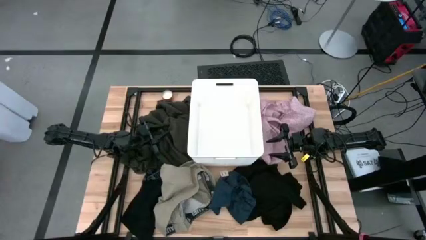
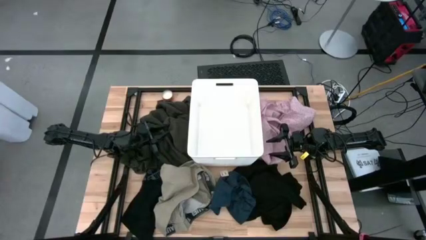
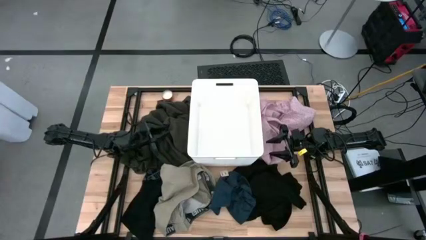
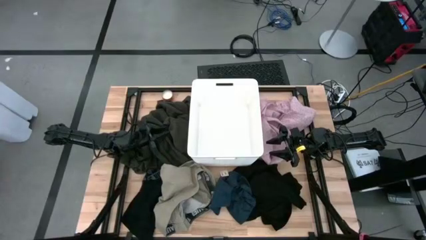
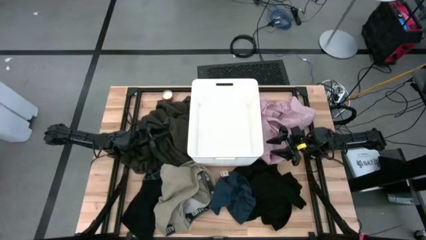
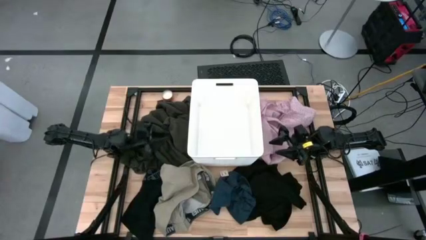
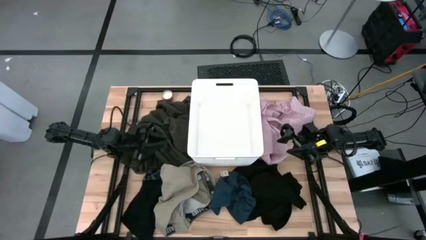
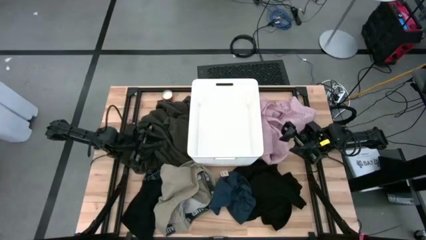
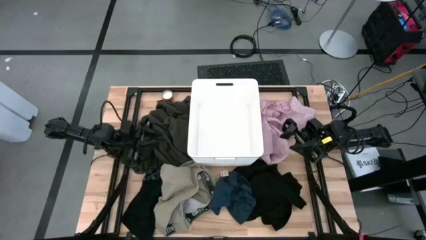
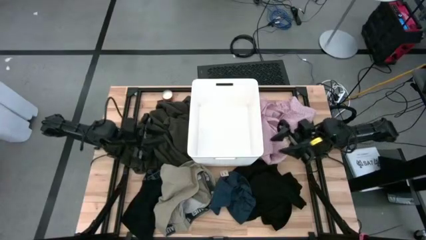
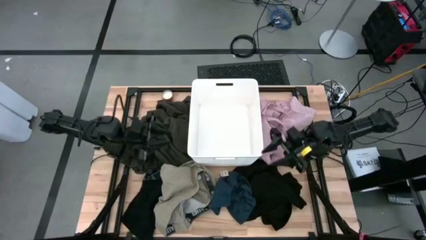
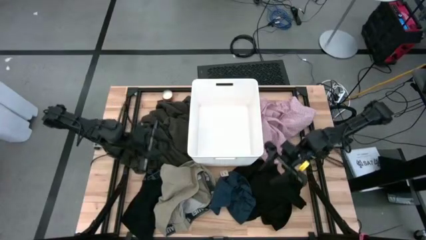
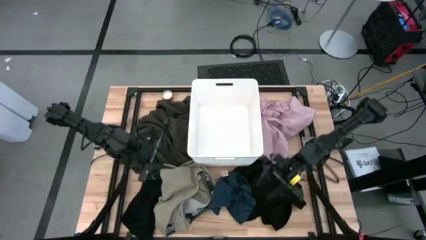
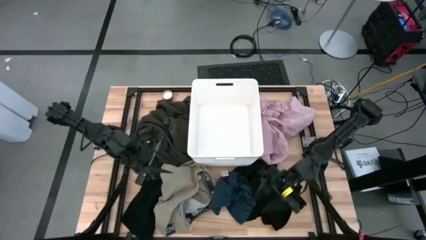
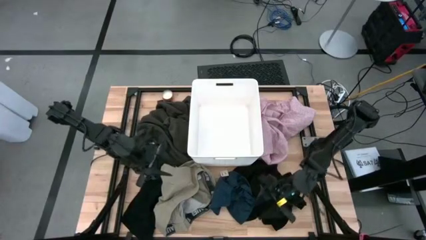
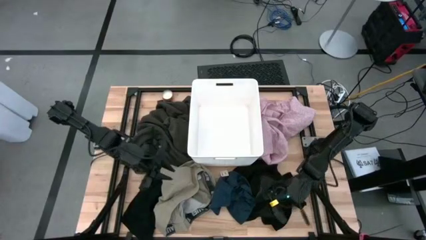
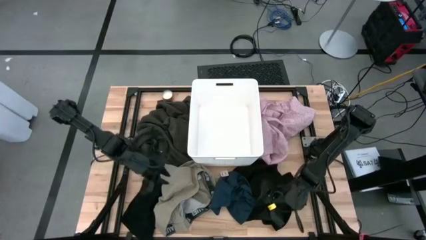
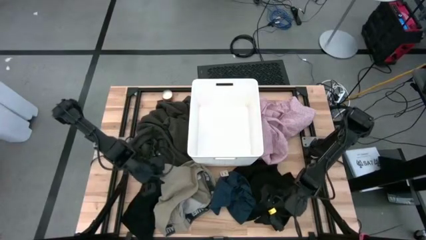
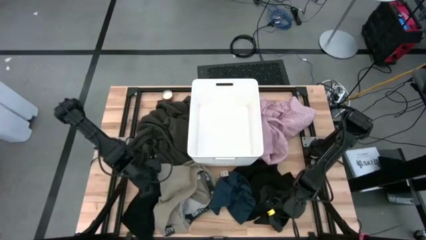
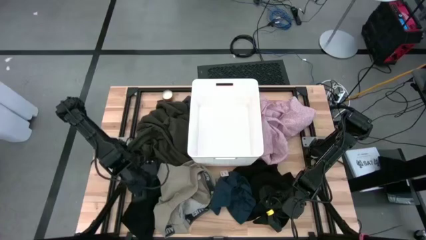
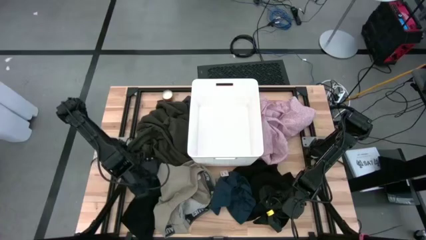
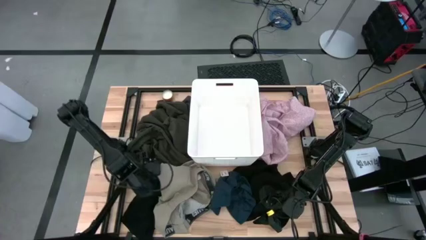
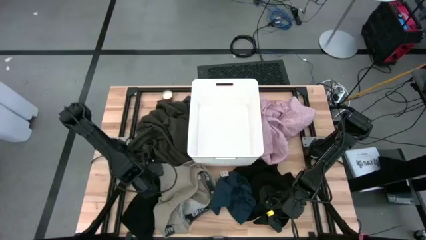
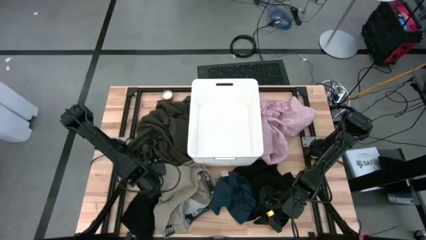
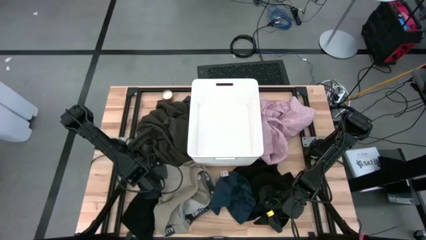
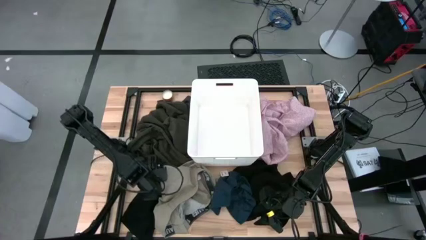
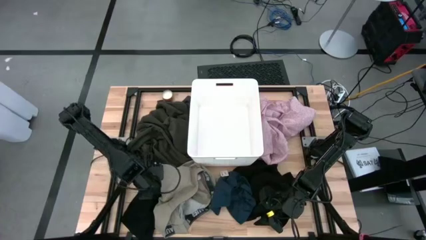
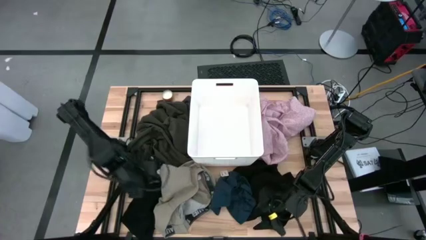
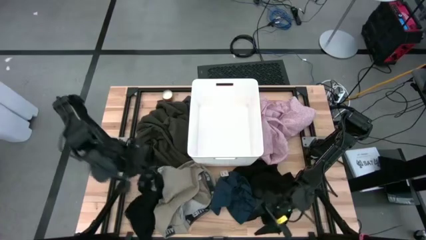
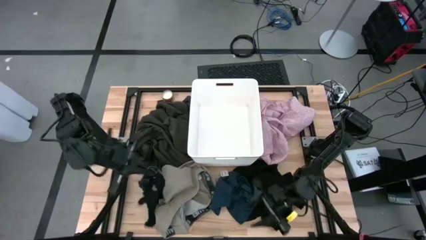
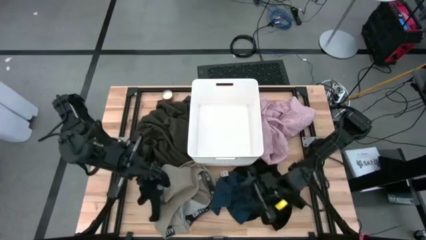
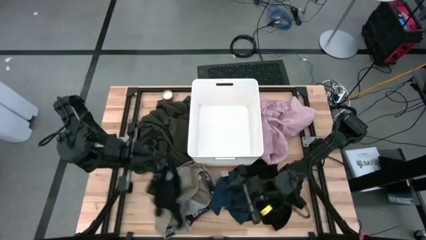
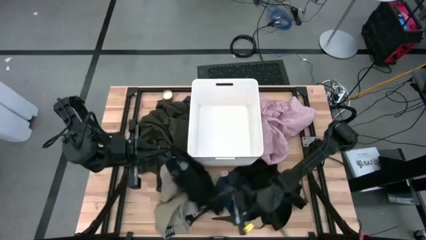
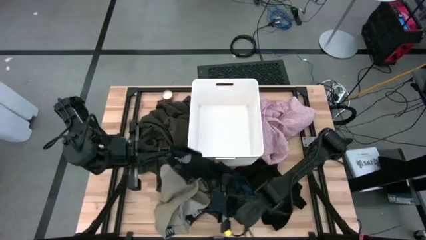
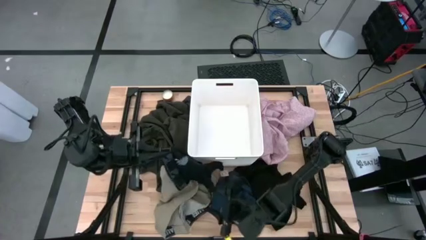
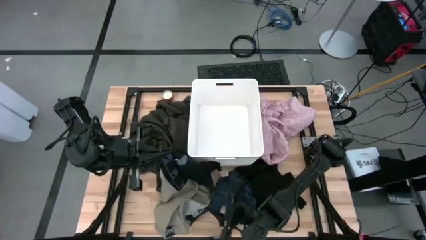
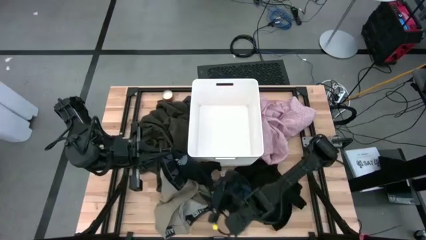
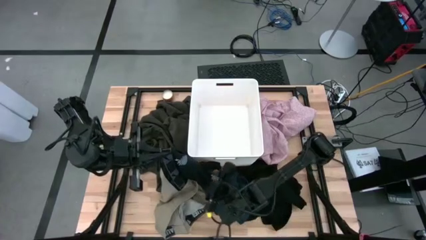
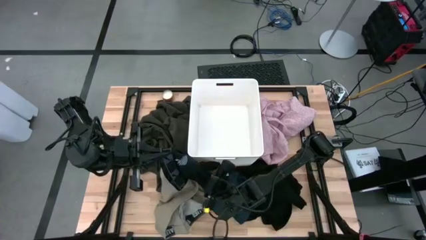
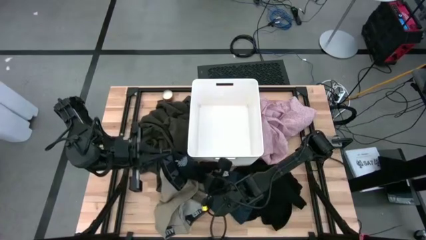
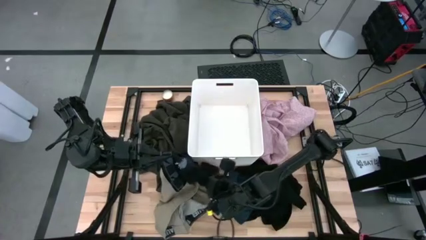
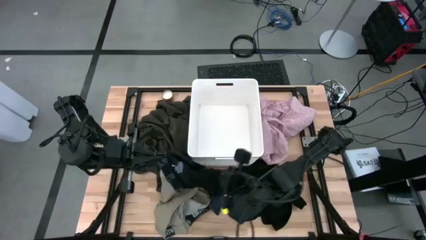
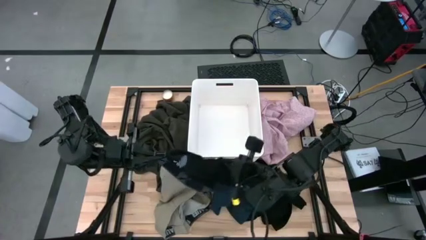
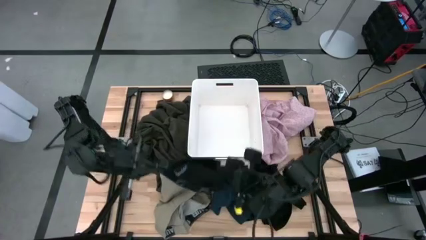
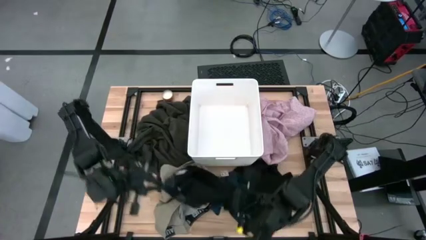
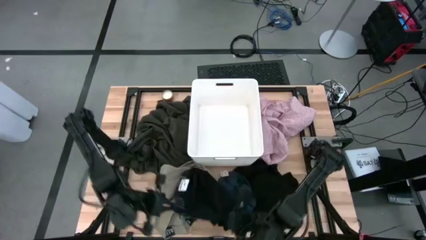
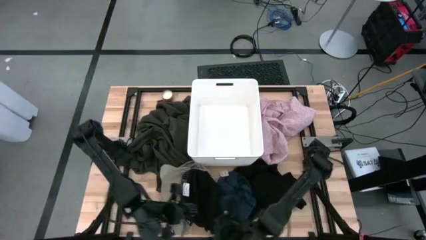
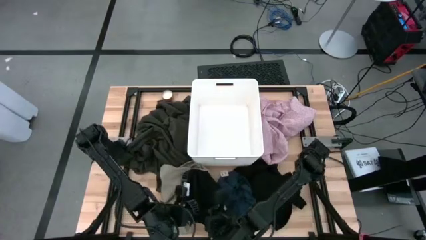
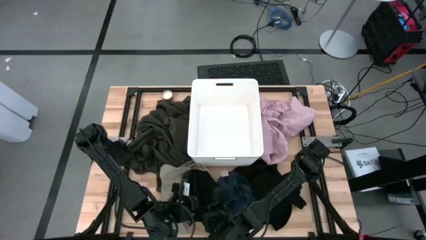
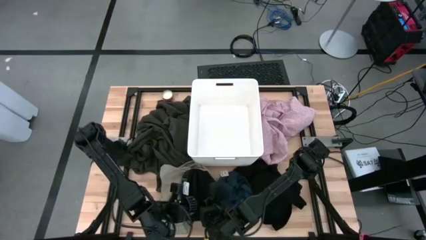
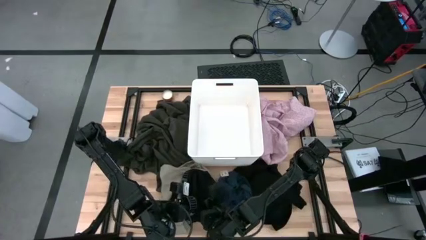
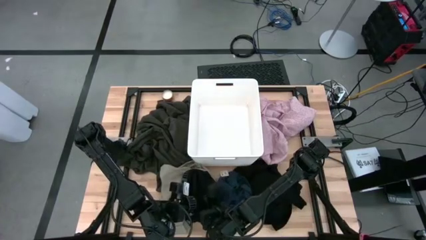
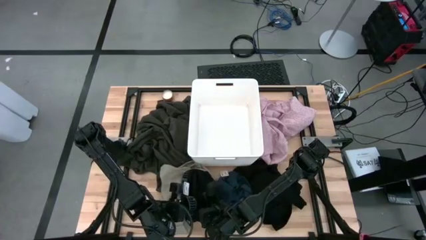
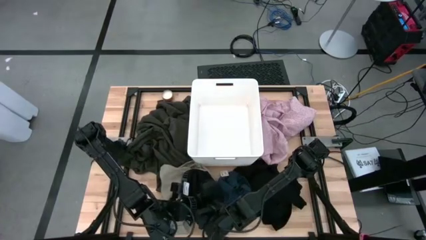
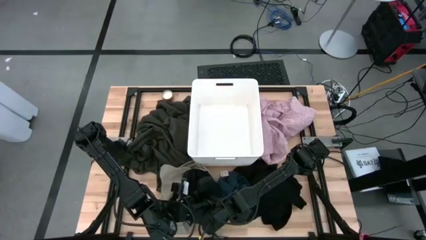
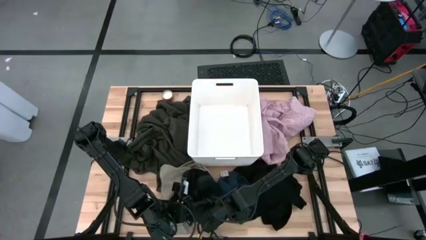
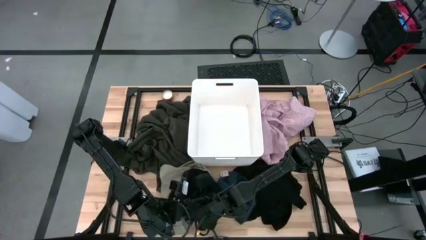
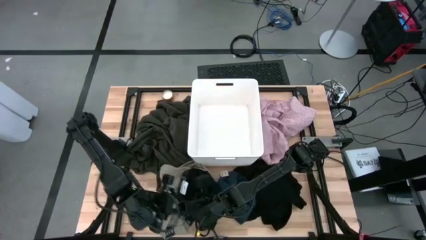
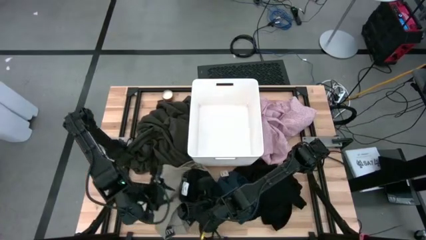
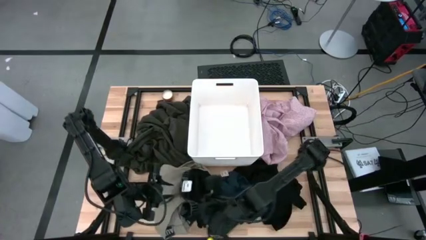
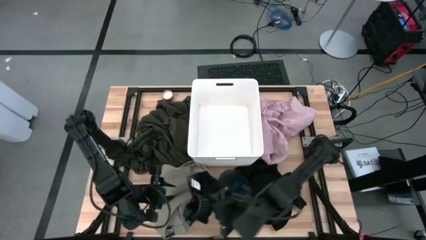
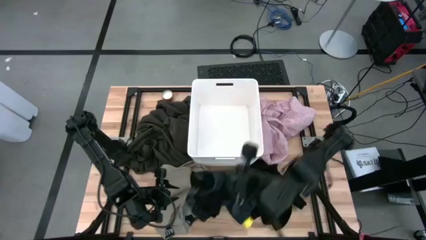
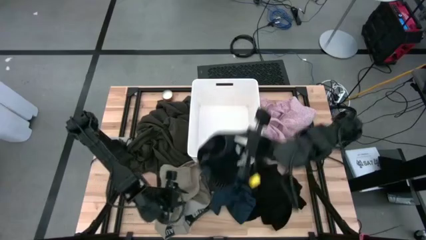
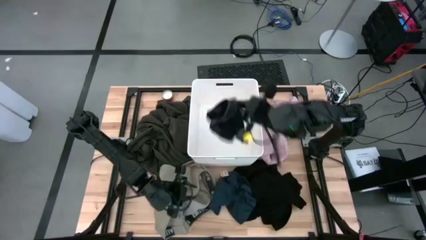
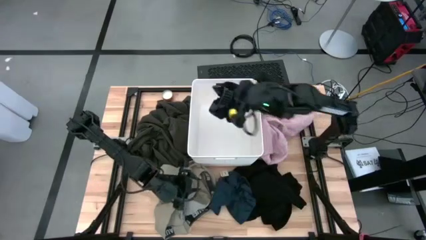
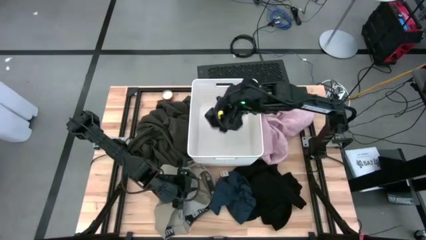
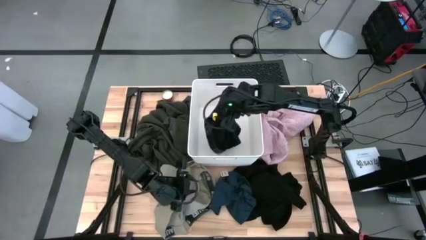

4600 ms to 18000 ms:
Task: Sort clothes
Put the black boxer into the laundry bin
